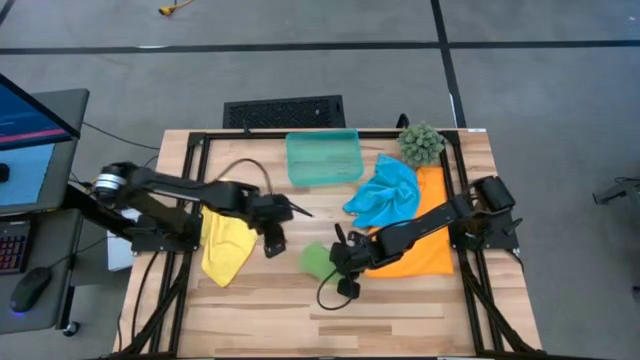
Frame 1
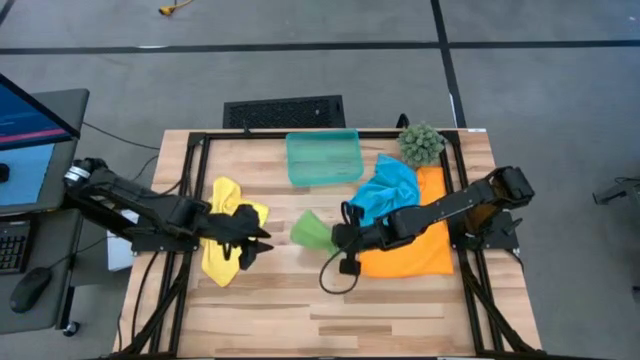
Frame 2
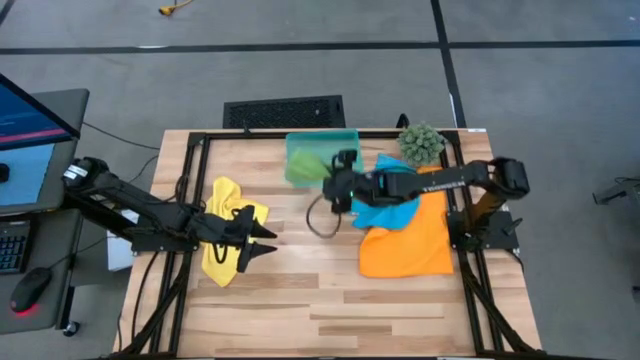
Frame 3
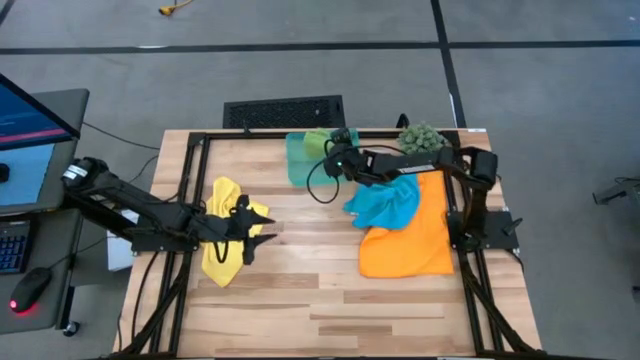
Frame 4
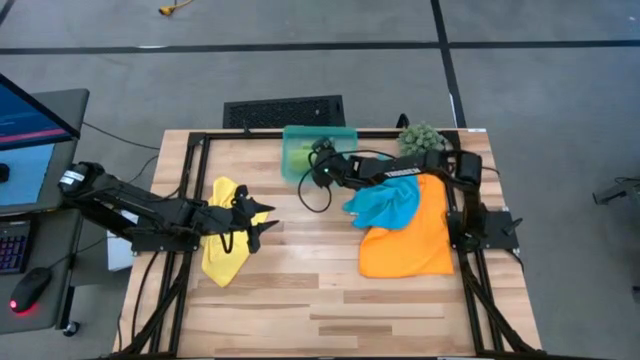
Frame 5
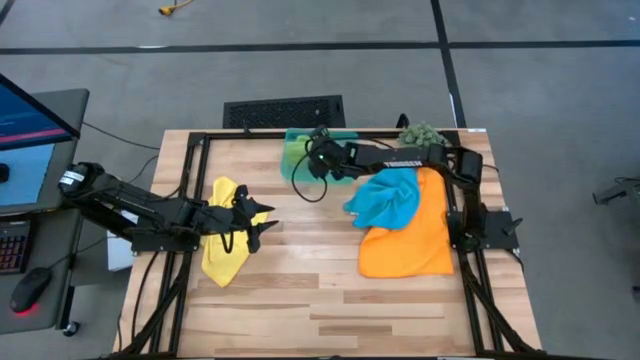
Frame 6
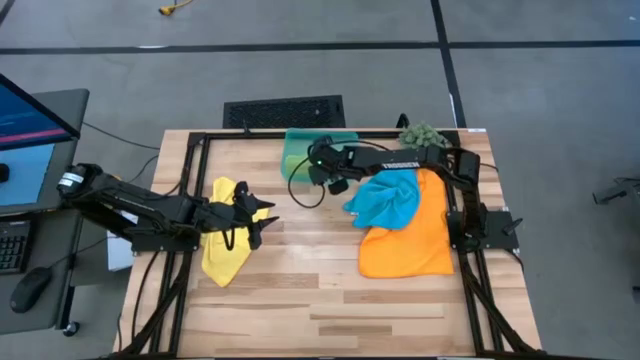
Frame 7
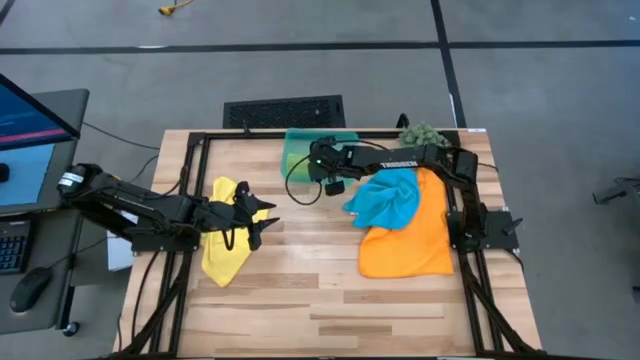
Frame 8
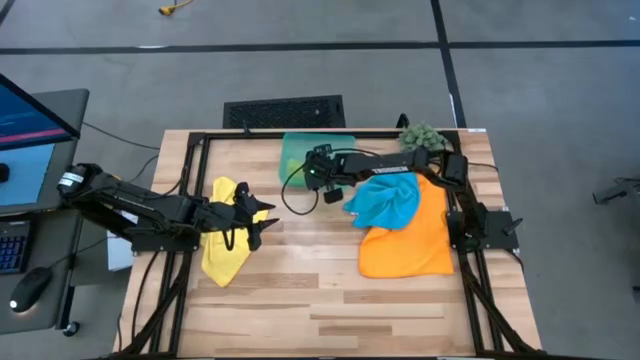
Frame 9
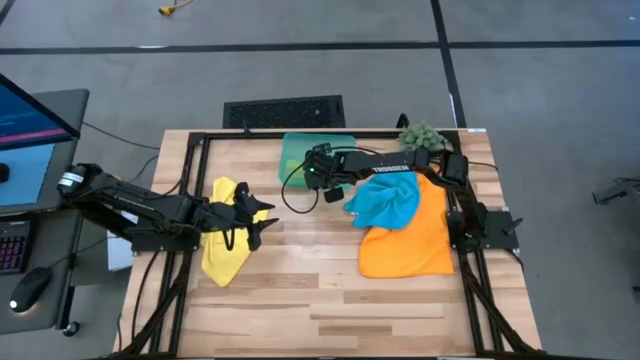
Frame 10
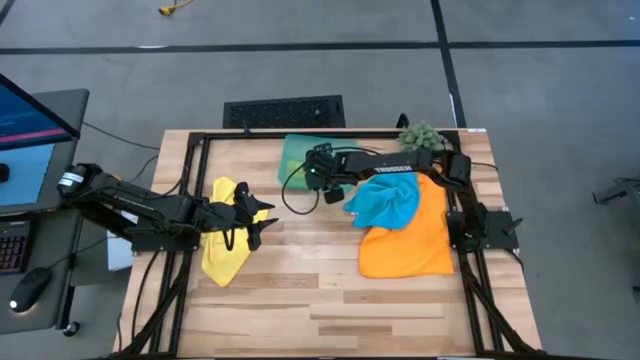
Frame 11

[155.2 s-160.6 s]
Task: Roll microfiber towels into tight, uniform cylinder then place into a basket
Put the rolled green microfiber cloth into the blue bin

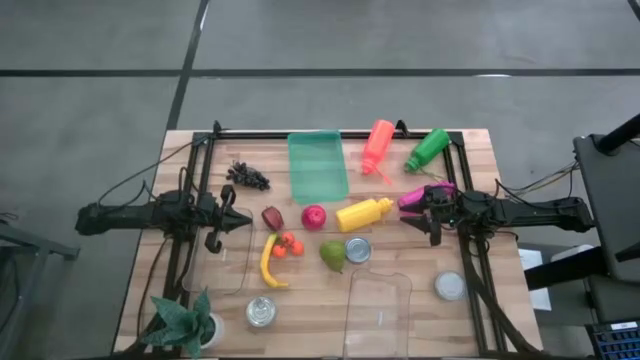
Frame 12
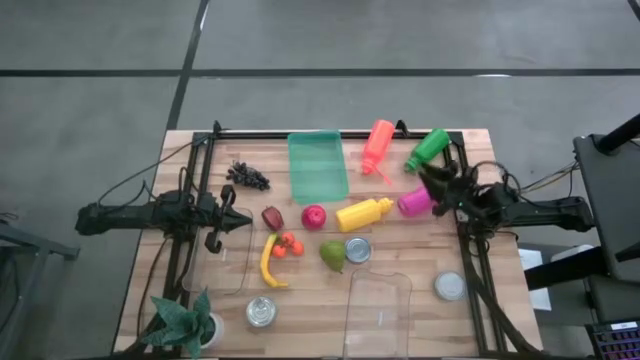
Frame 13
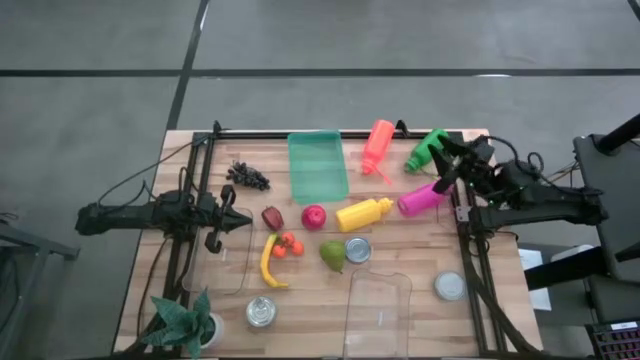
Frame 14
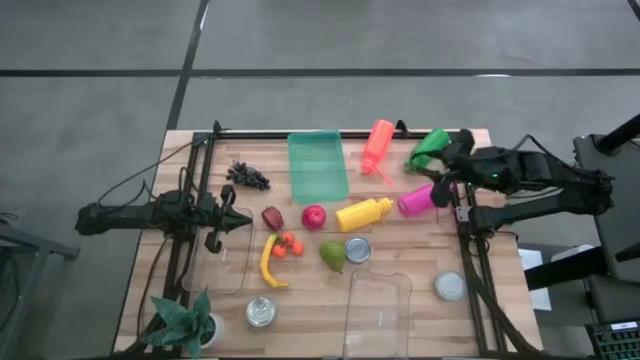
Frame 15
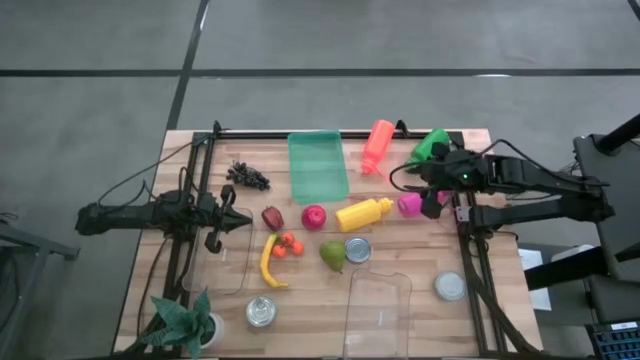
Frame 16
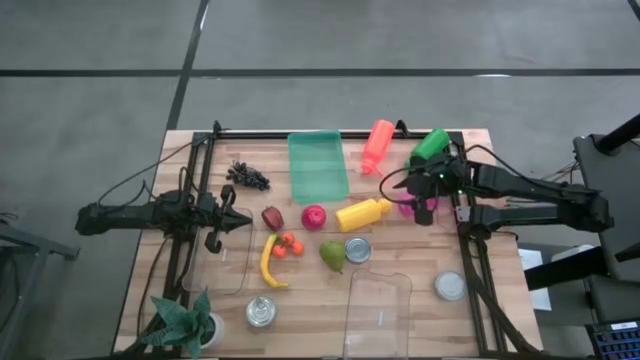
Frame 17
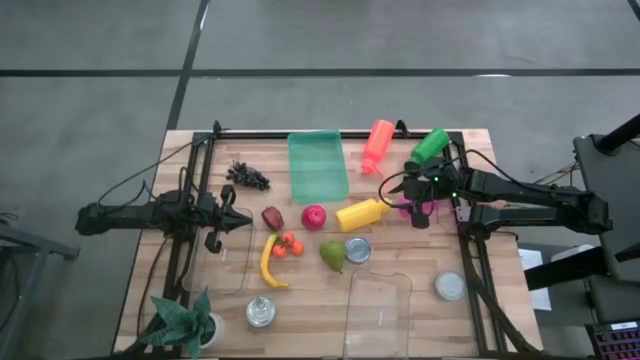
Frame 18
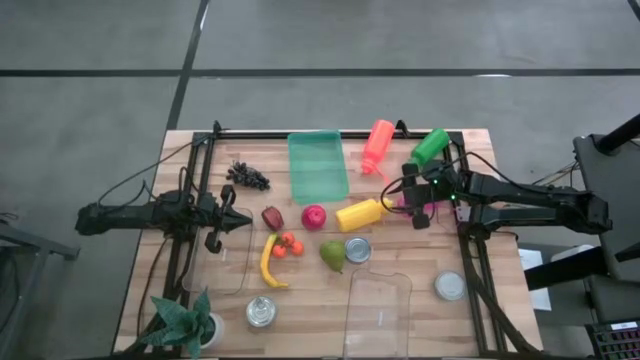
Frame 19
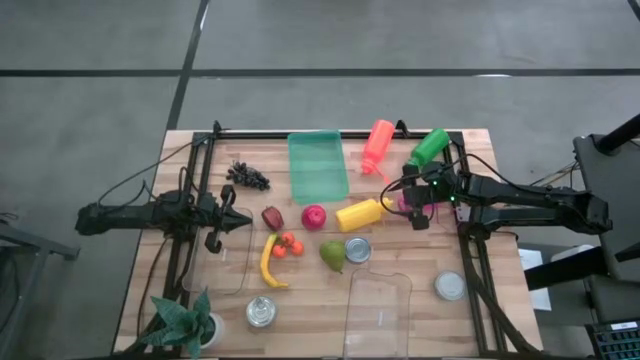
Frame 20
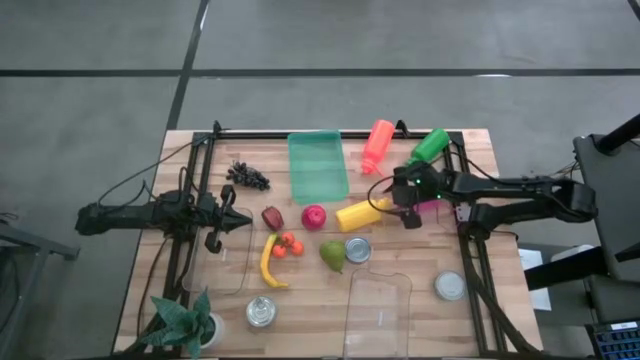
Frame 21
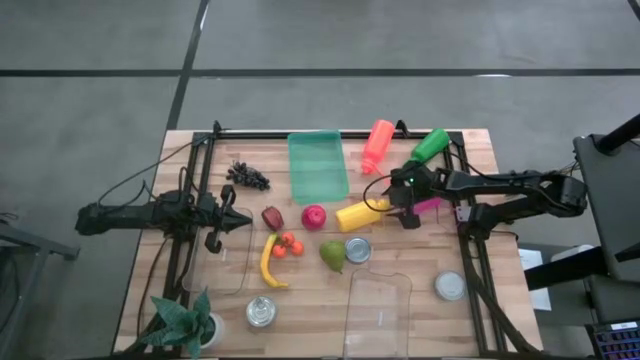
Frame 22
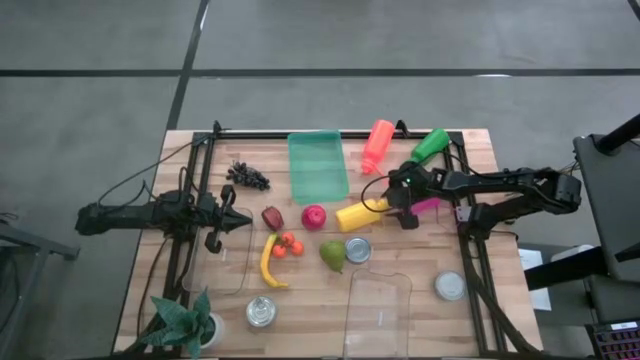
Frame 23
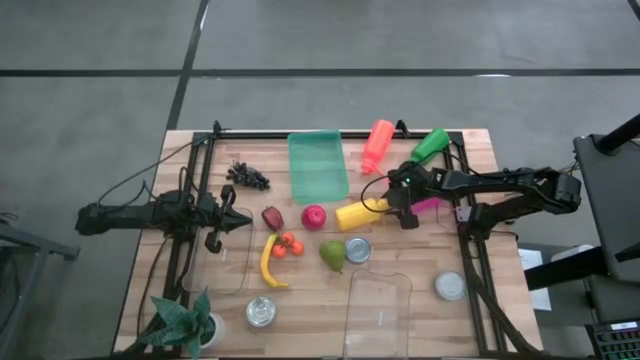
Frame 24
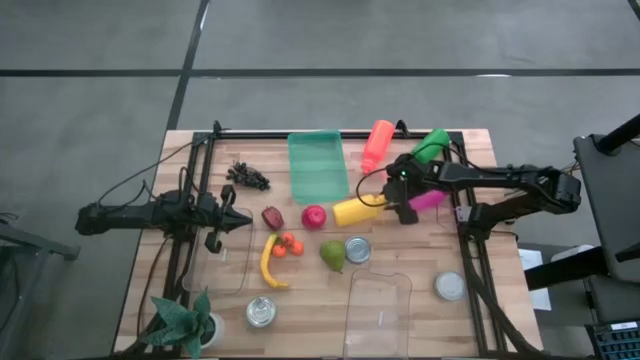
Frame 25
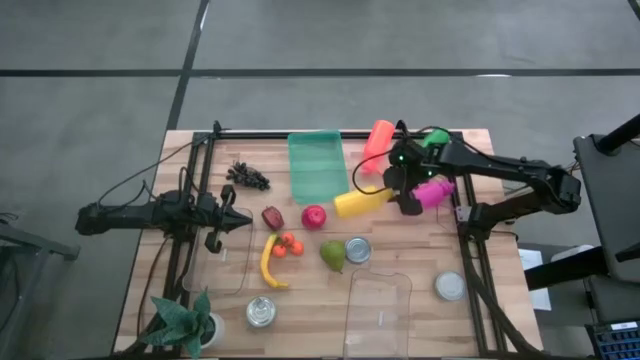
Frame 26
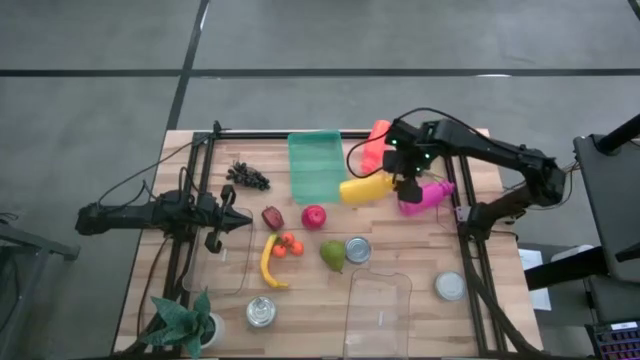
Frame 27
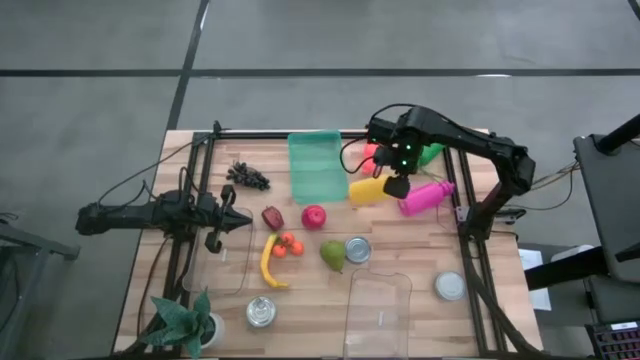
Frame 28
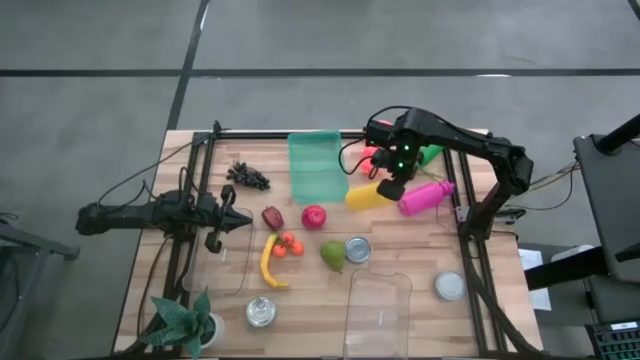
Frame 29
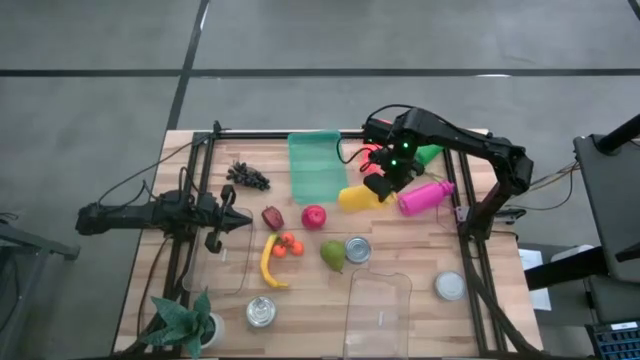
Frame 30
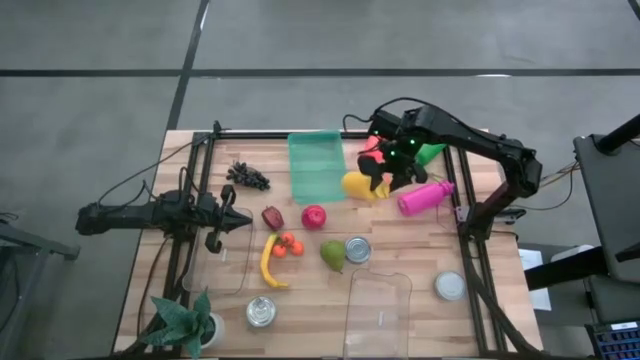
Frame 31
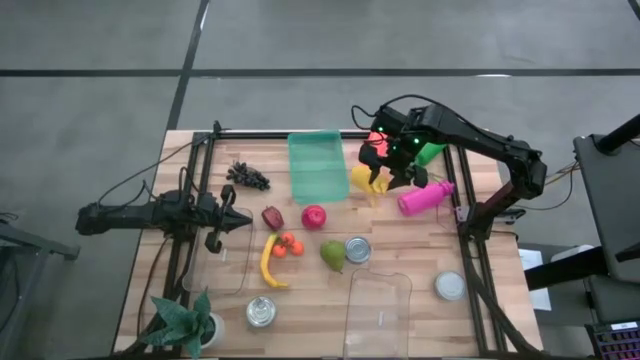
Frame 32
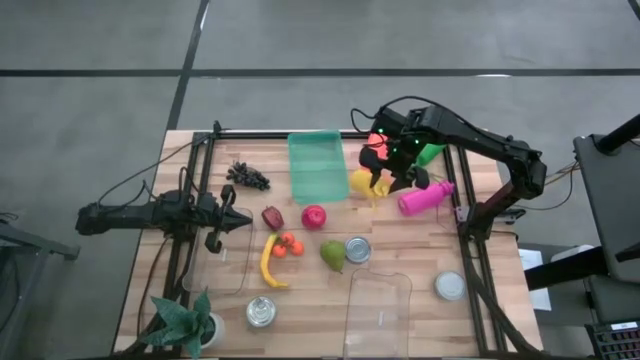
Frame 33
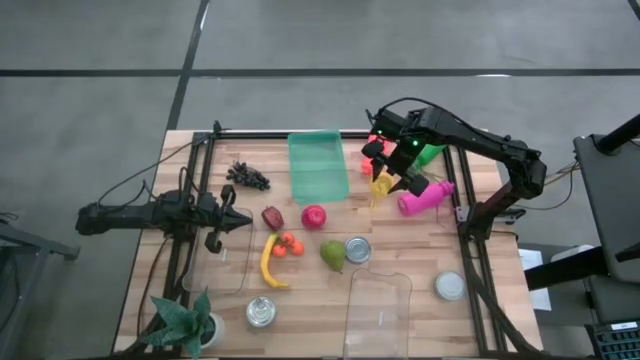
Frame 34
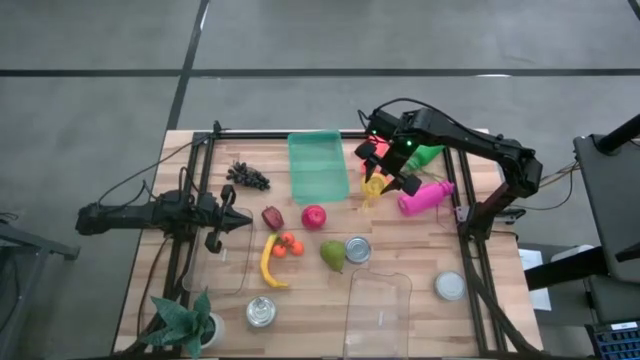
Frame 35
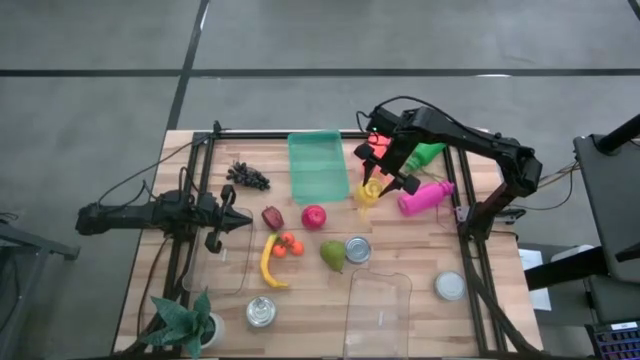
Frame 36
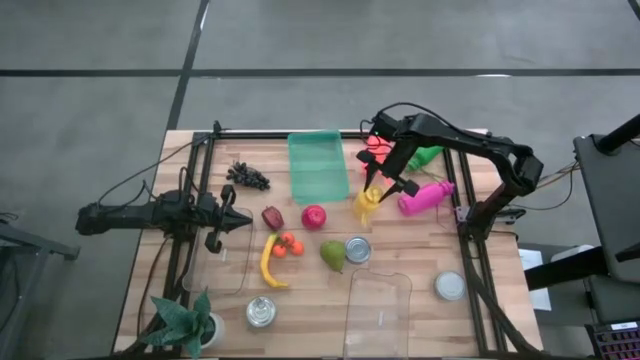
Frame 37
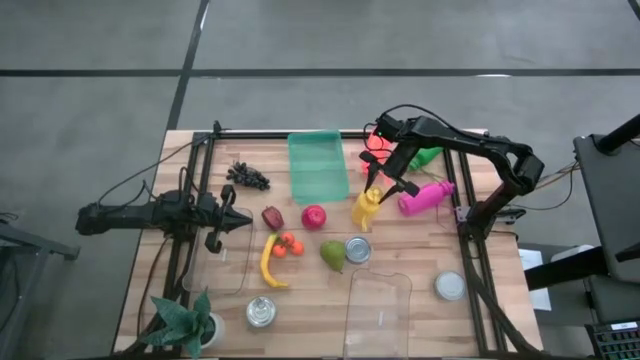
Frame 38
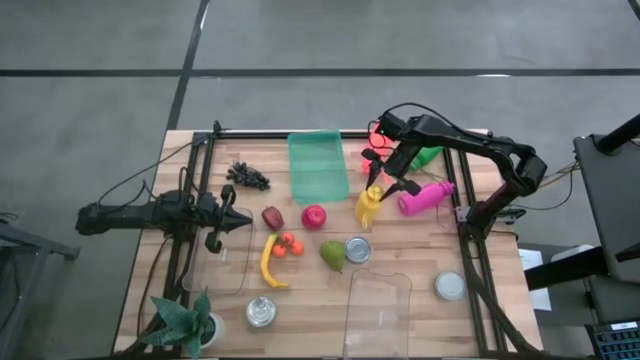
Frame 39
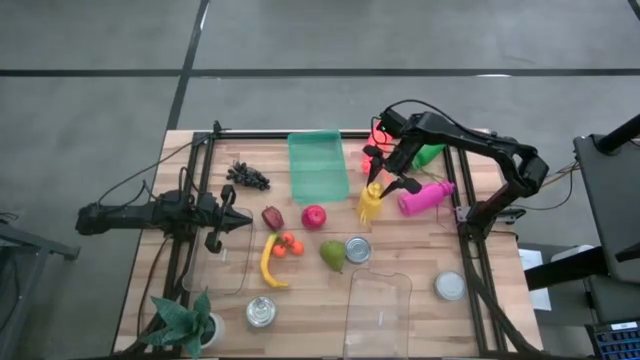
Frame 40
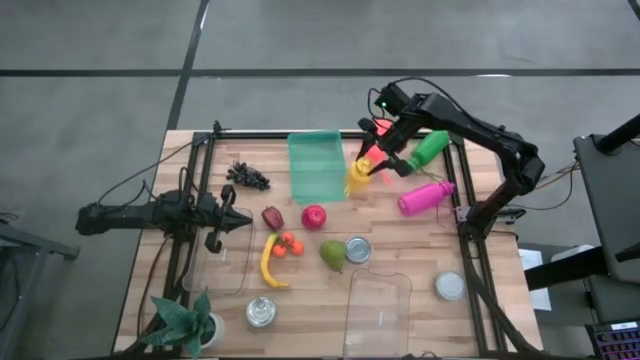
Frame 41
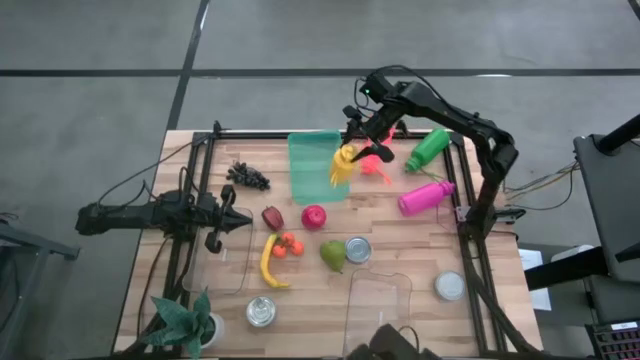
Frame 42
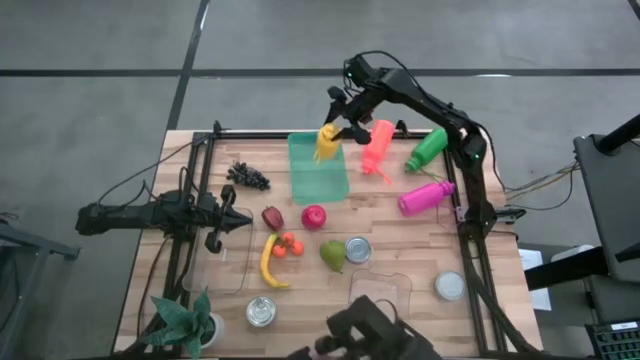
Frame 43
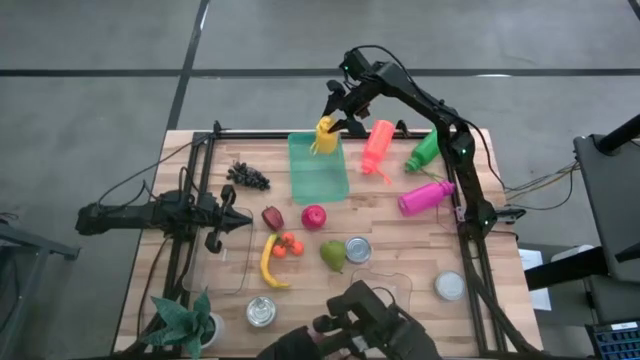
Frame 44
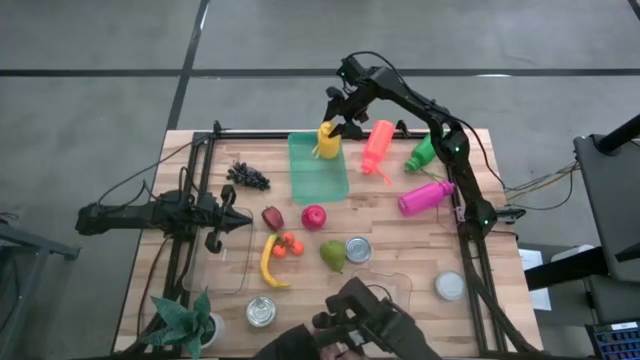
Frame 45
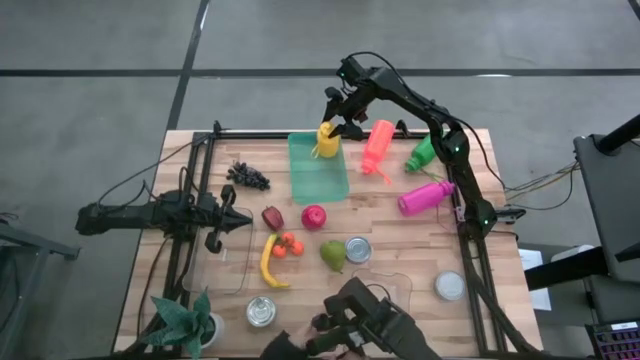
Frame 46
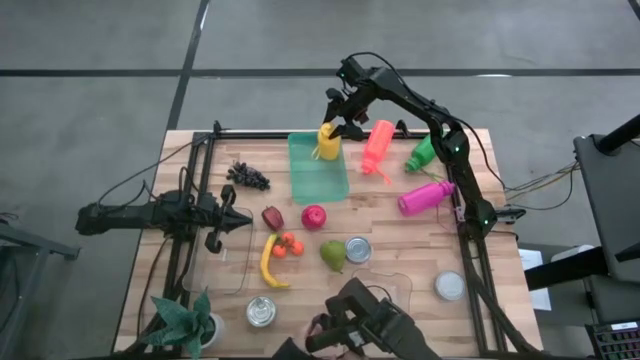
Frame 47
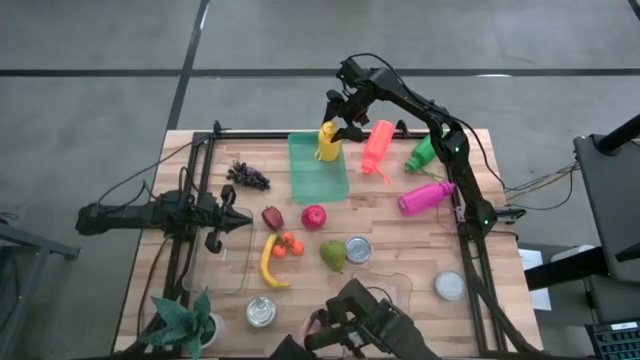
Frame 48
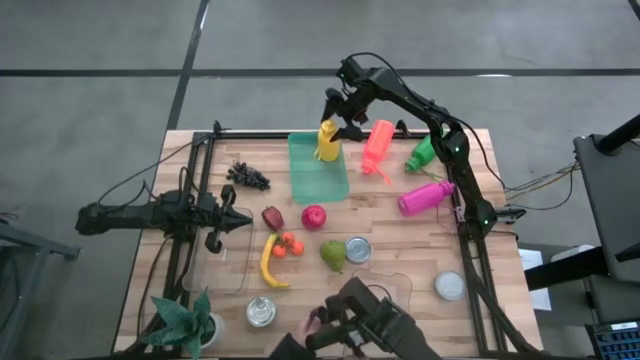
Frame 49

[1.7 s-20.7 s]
Task: Pick & Place Food Item
Put the yellow water bottle into the green bin
